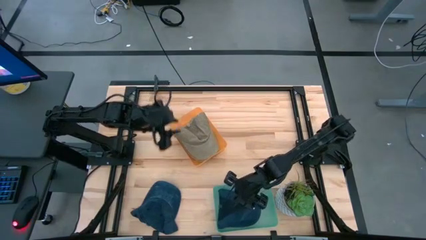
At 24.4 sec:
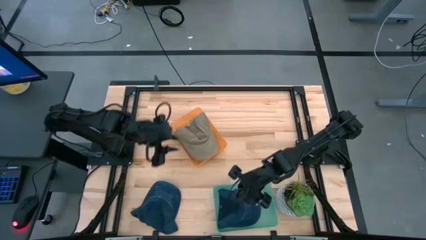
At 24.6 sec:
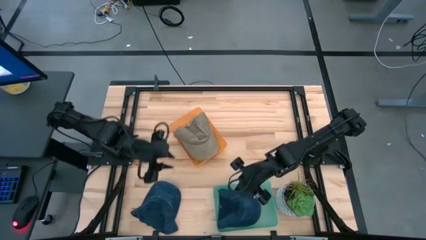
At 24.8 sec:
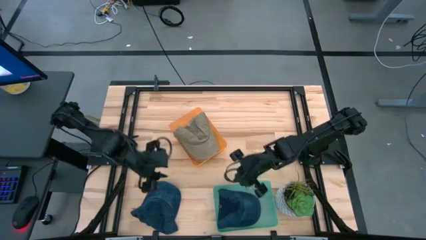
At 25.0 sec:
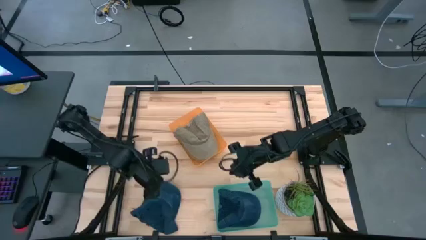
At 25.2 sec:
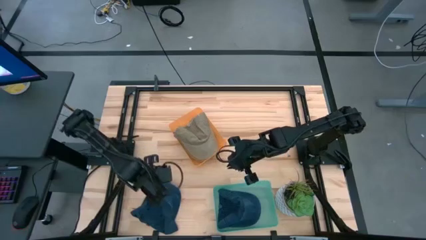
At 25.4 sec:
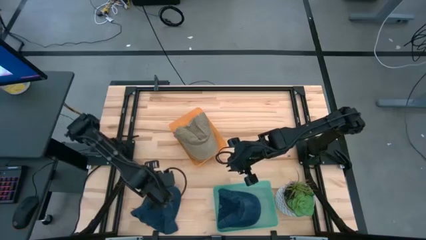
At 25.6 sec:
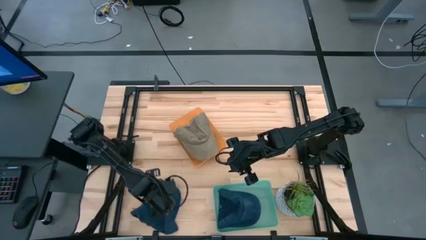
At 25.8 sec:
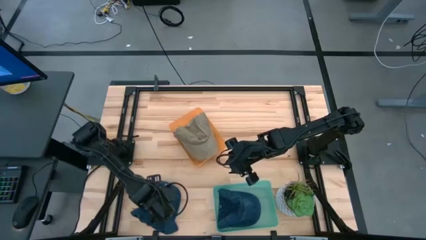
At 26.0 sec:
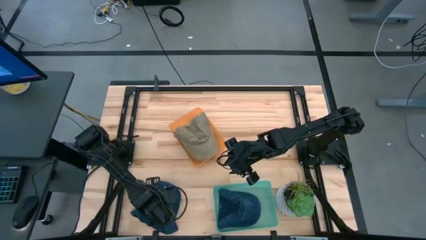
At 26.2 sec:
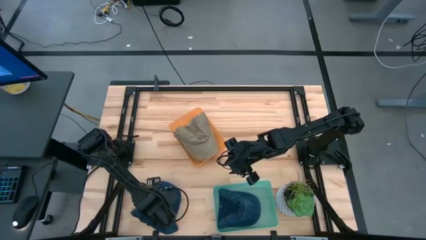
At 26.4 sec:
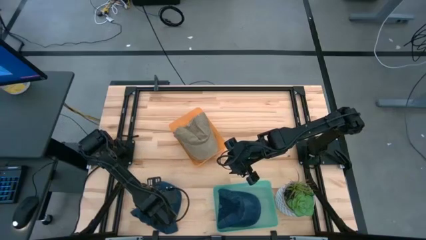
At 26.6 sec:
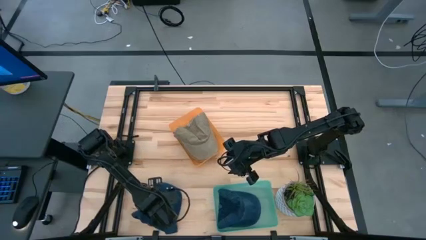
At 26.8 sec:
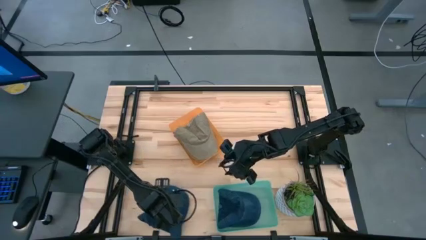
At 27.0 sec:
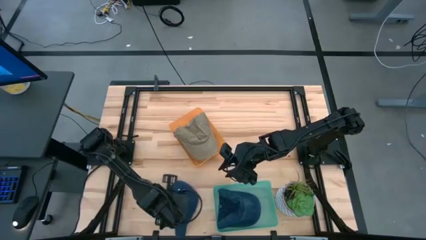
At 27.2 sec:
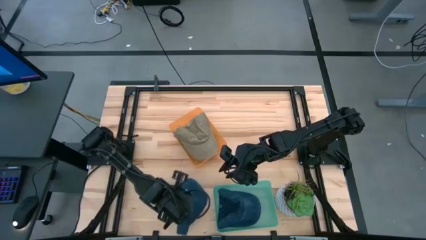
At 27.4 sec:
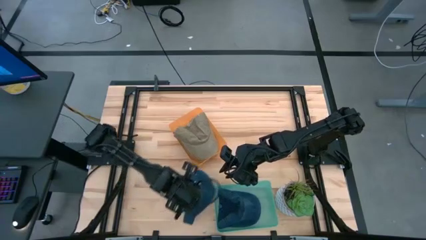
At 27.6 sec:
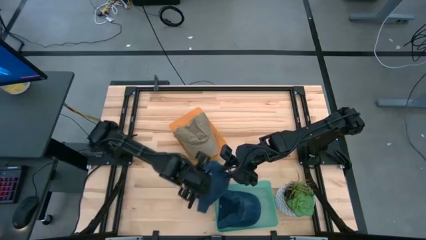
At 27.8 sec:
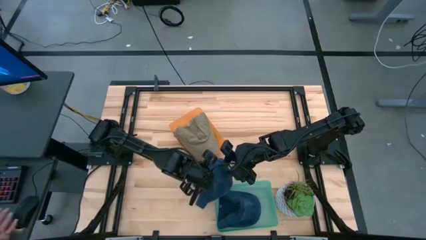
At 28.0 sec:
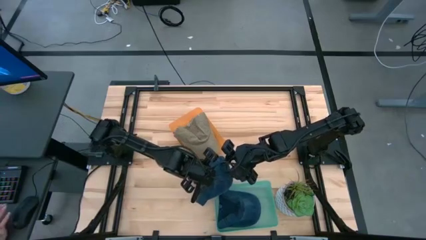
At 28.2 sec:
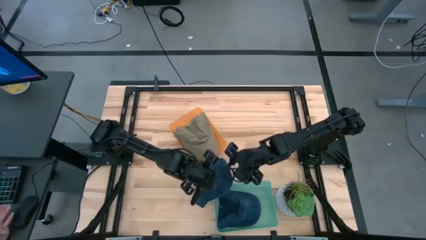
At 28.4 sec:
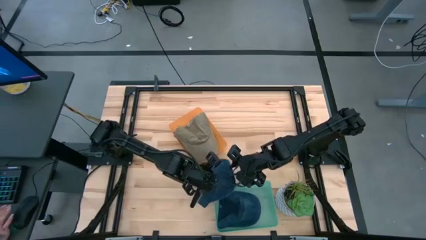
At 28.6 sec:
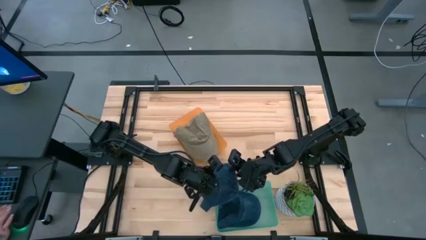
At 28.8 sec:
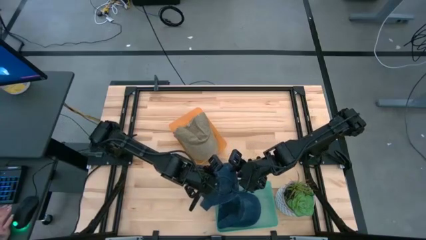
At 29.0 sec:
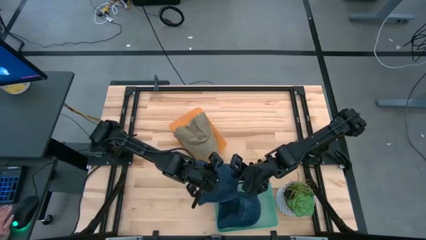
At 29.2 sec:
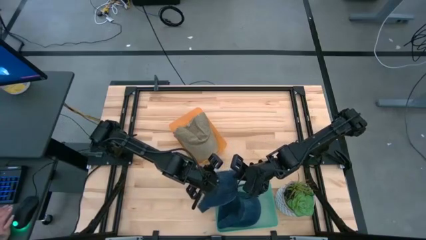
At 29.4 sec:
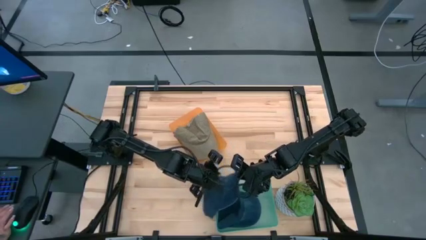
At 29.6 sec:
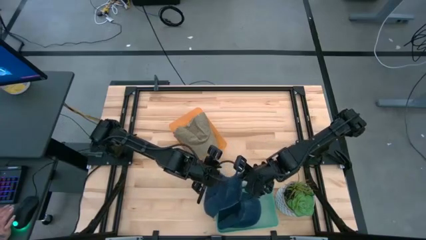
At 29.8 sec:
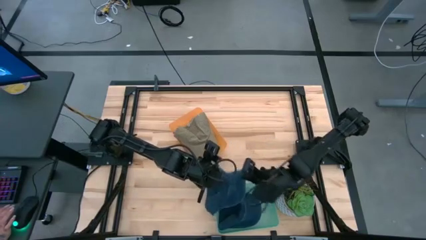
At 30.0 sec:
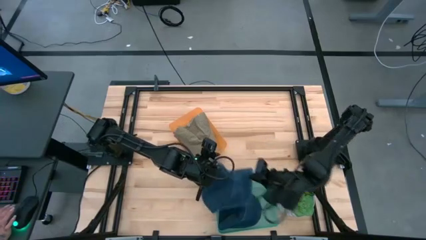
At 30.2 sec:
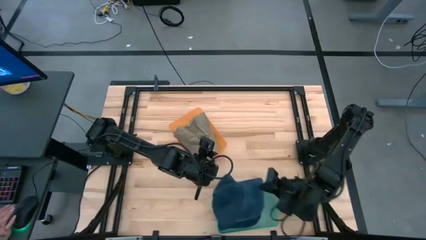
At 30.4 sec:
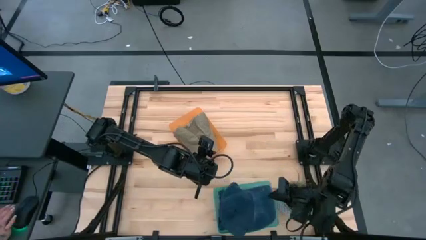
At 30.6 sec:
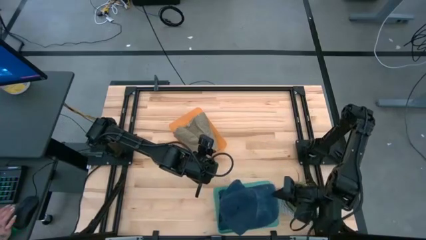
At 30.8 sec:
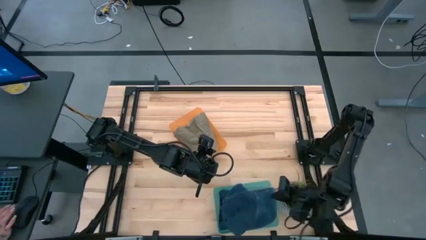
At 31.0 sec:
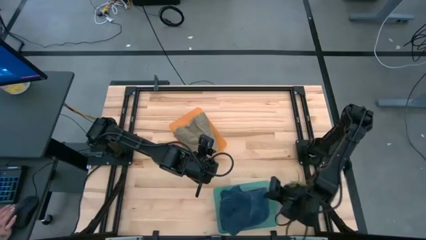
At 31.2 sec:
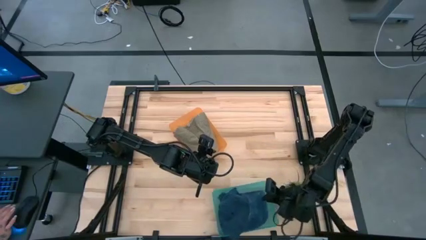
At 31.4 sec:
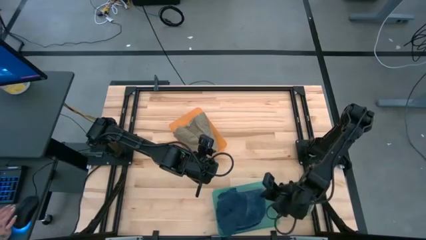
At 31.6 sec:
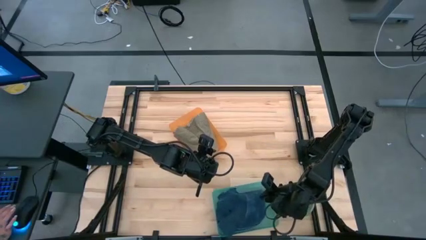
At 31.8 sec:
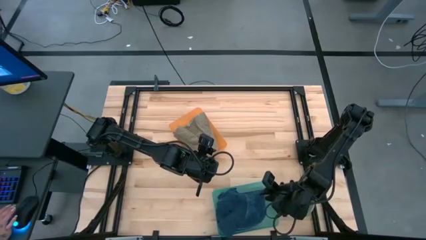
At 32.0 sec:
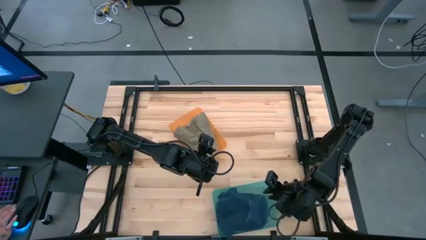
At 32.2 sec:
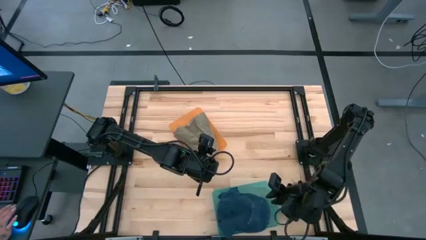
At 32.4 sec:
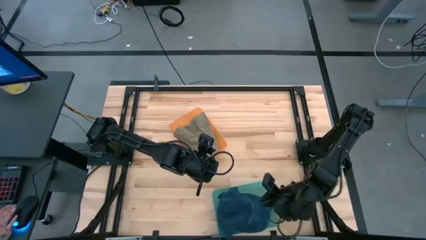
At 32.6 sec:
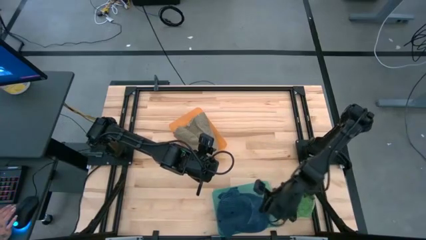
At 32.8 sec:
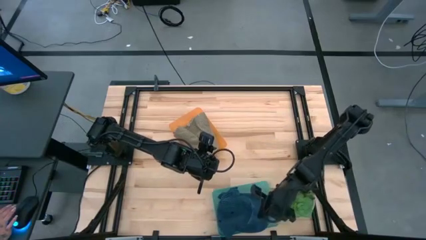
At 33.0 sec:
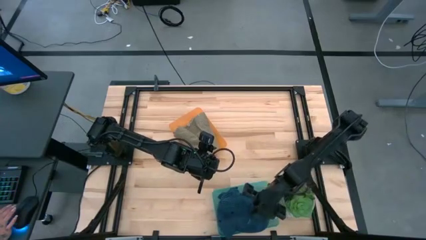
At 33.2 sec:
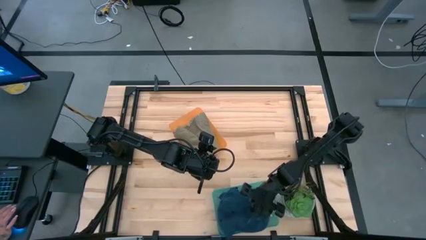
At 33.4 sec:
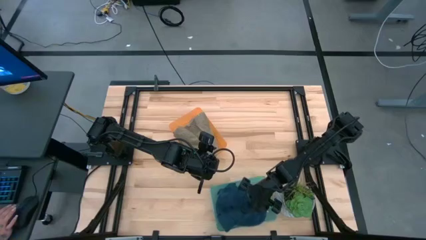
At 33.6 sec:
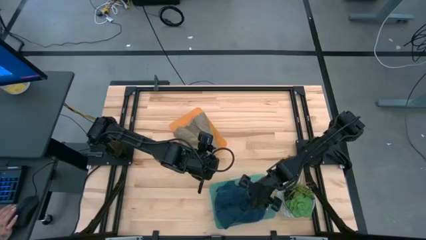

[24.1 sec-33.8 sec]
Task: Pick & Place hat
Put the blue cap into the green bin

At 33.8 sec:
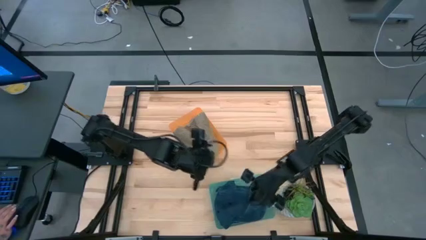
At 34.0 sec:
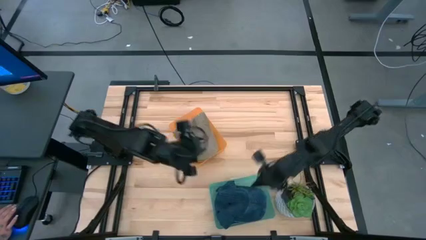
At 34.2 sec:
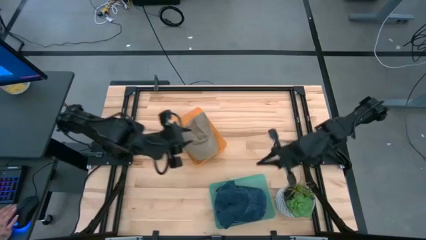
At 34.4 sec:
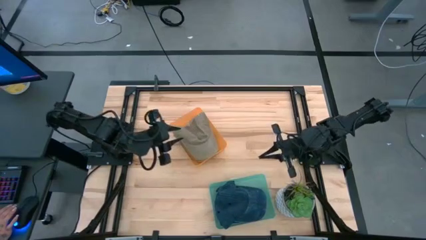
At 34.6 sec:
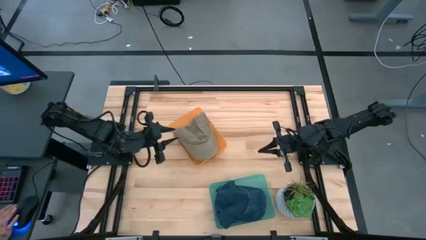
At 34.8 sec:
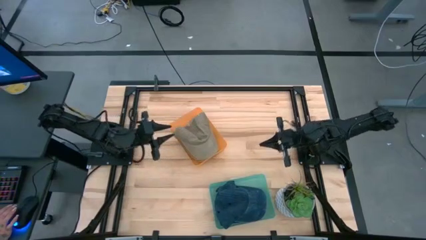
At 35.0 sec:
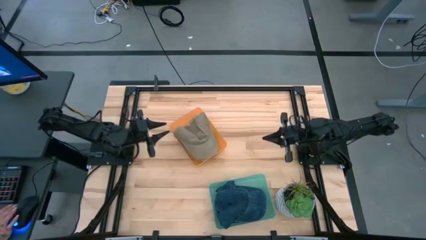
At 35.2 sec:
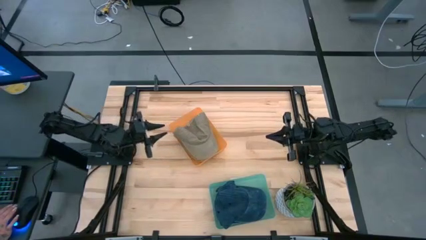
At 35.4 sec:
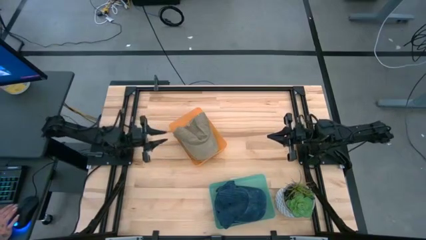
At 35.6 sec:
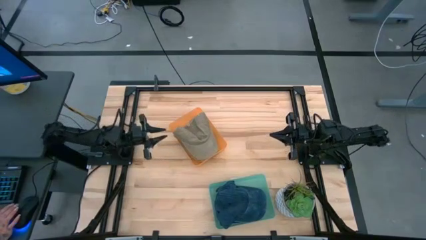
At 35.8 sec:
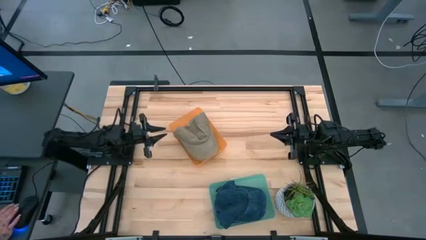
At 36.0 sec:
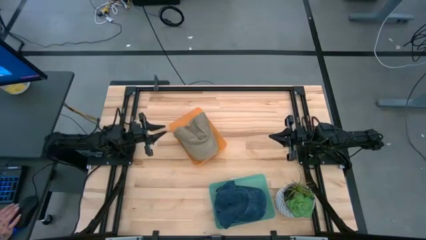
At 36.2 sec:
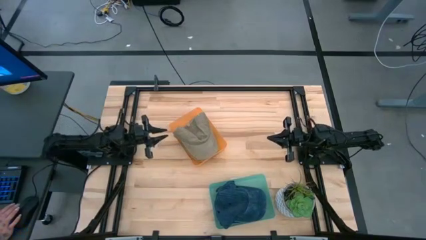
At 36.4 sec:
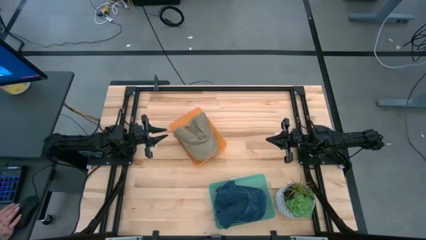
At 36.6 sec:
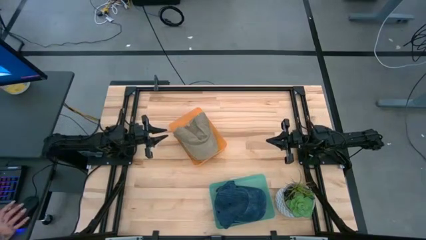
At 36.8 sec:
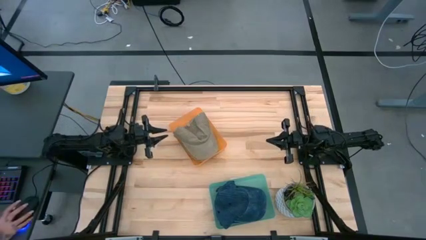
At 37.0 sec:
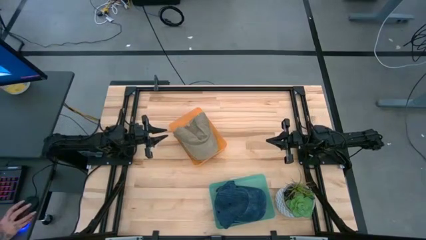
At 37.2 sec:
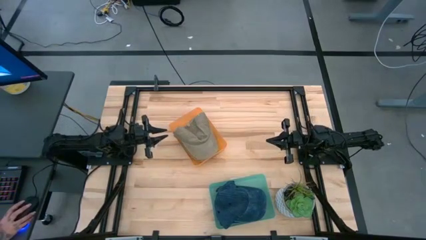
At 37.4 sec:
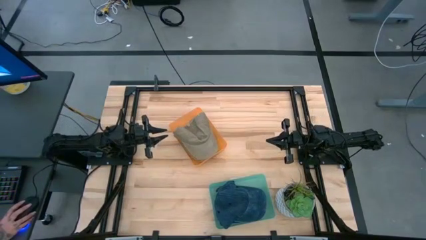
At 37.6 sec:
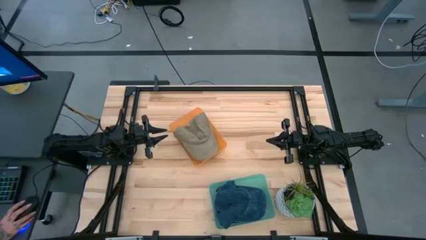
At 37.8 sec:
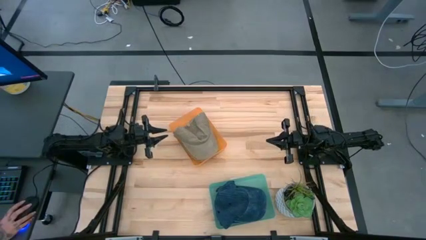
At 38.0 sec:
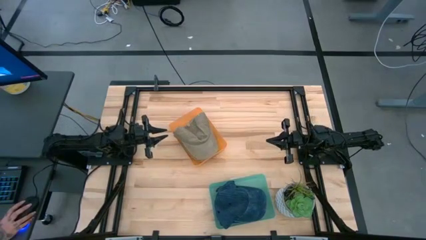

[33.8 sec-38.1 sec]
Return to Home Position

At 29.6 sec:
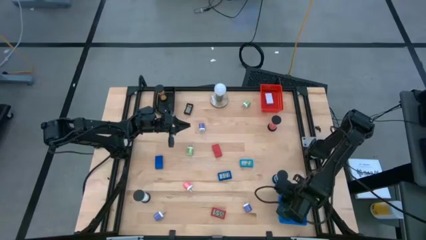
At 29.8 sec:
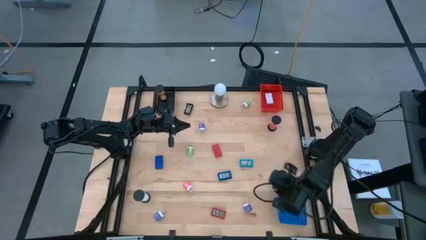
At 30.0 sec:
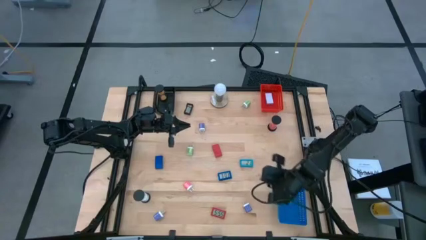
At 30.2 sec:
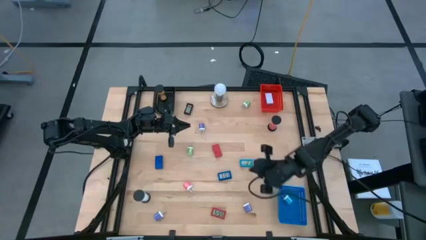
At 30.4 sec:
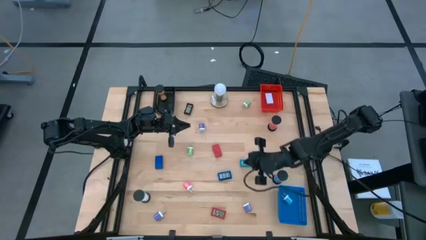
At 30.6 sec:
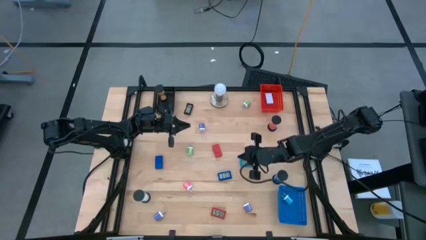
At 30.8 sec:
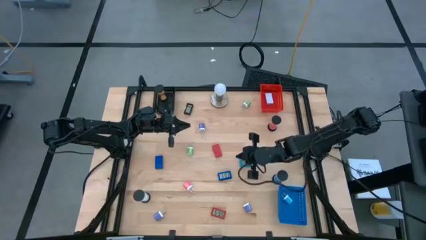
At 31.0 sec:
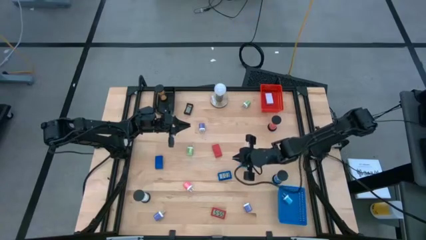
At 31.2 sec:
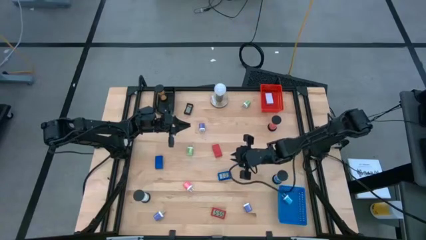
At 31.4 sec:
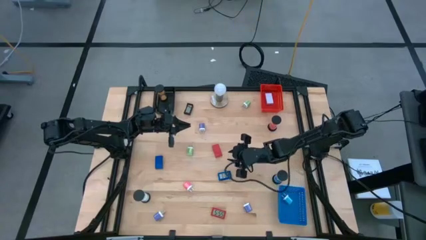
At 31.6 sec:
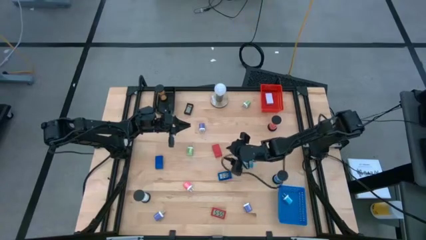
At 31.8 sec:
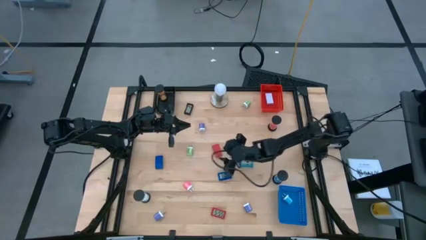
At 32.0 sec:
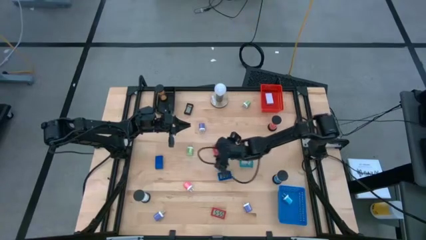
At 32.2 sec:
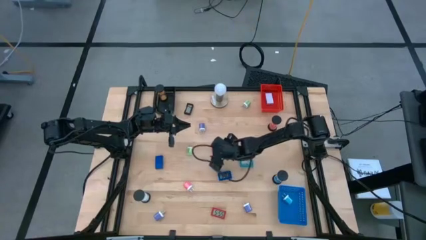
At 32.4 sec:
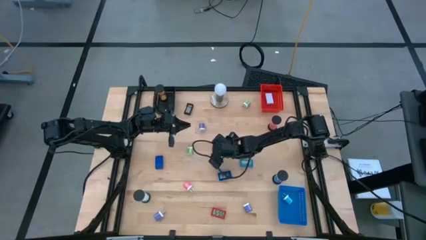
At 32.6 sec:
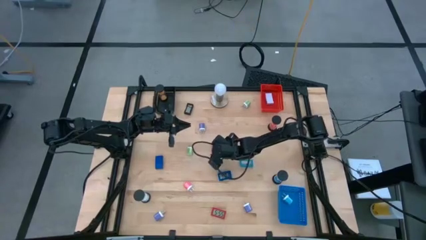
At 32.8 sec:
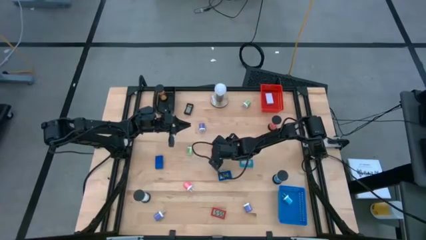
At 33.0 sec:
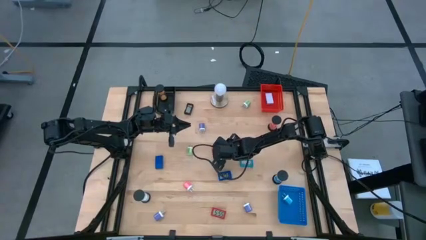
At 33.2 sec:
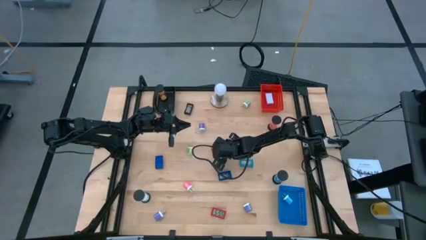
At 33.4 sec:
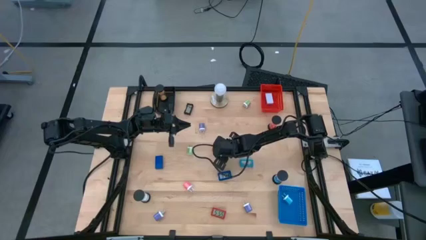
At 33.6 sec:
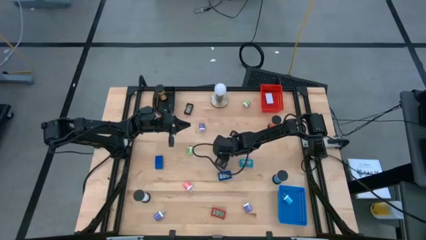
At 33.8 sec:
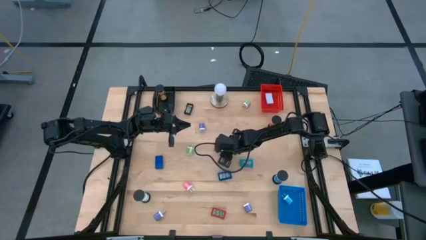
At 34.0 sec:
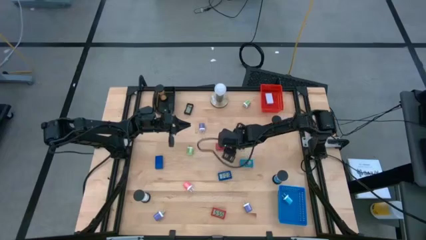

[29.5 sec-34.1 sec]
Task: Pick & Place Office items
Put the top red digital clock into the red bin
